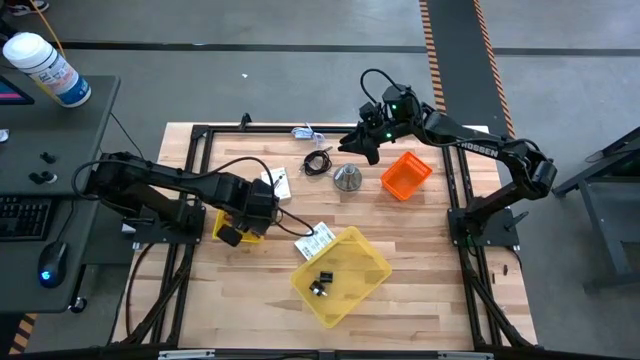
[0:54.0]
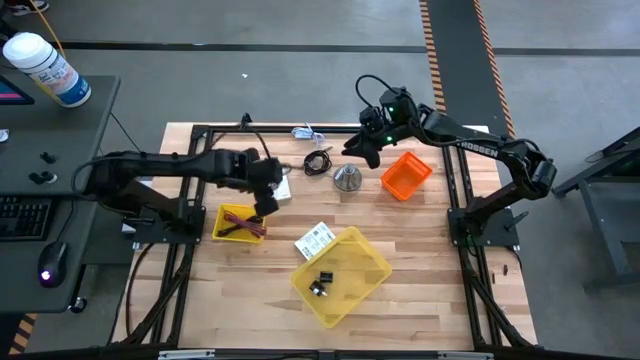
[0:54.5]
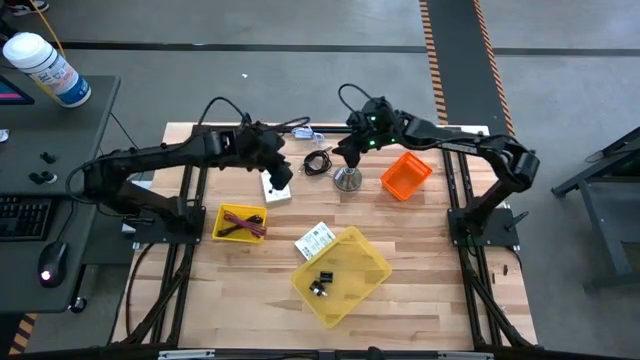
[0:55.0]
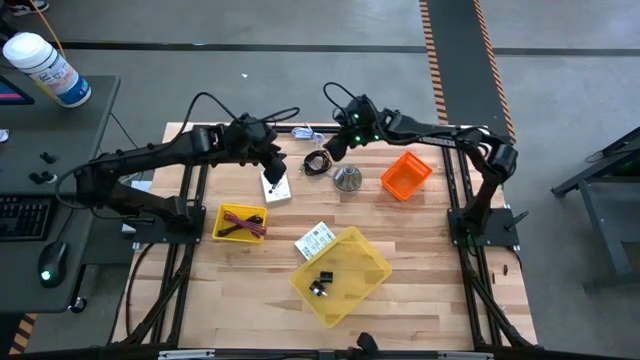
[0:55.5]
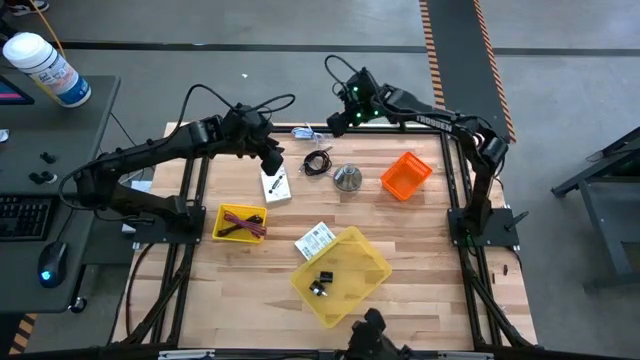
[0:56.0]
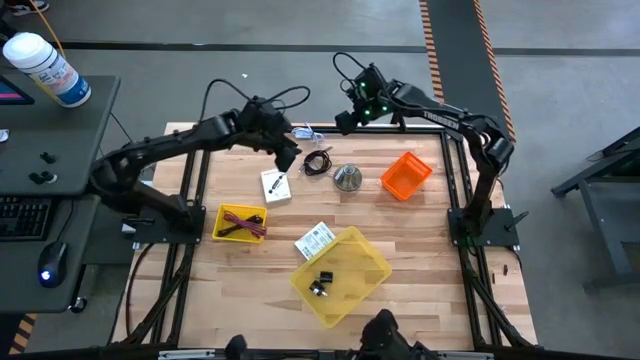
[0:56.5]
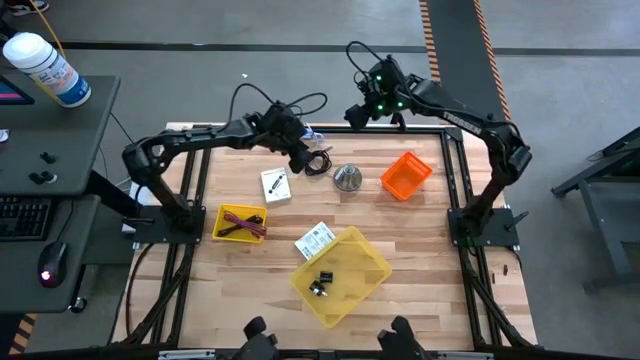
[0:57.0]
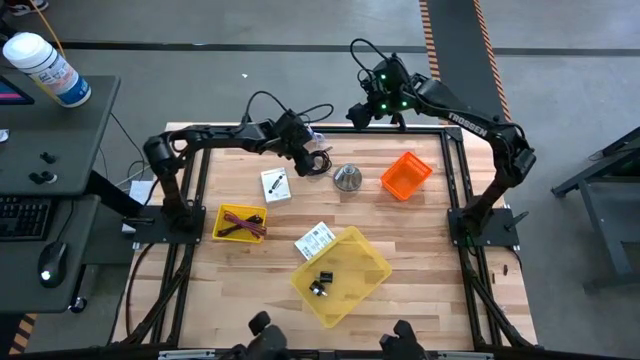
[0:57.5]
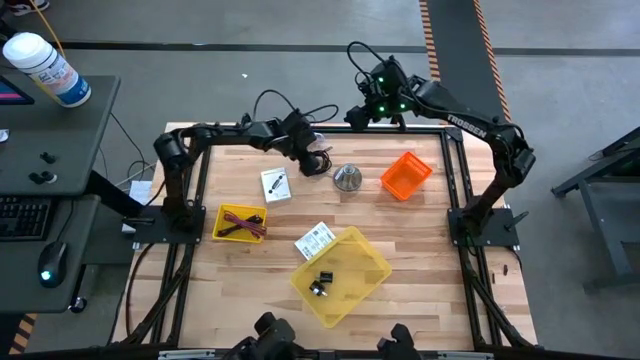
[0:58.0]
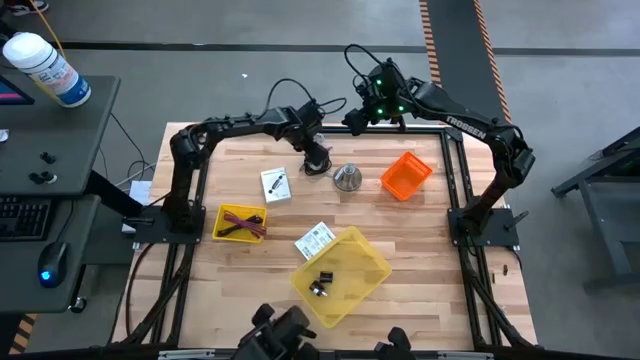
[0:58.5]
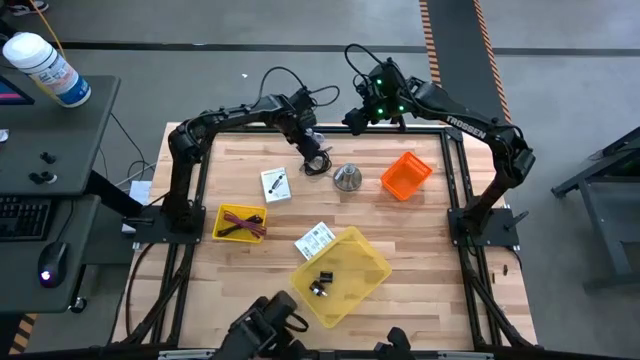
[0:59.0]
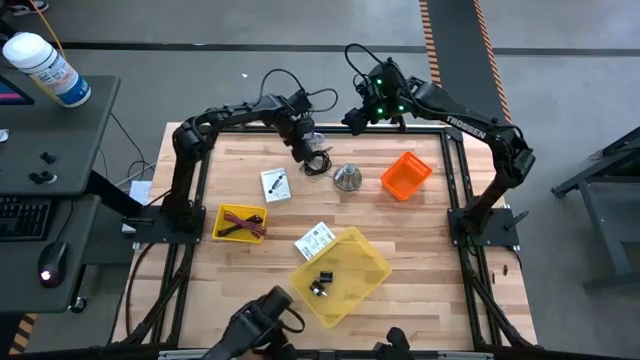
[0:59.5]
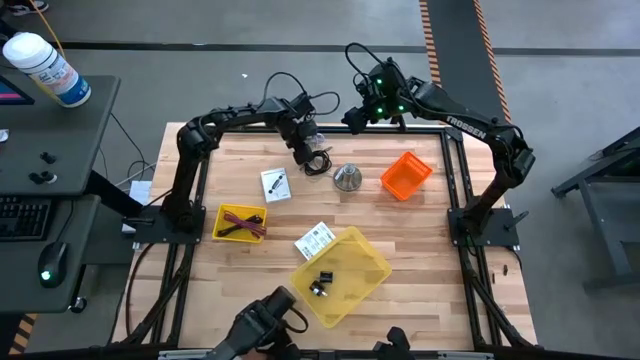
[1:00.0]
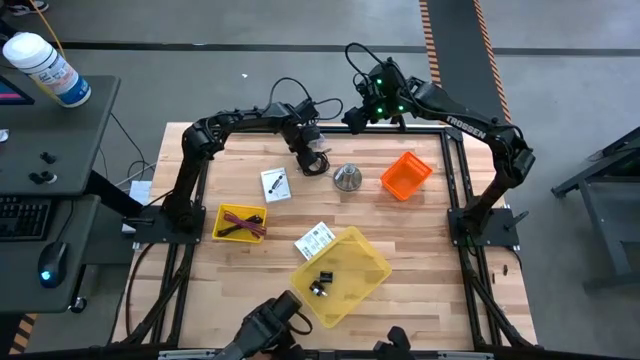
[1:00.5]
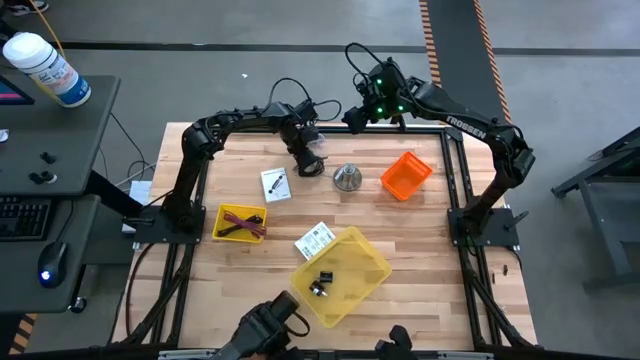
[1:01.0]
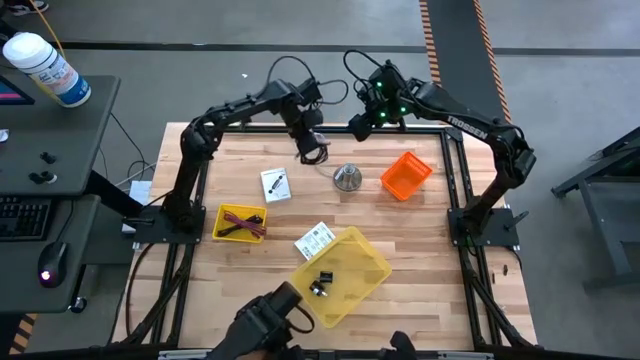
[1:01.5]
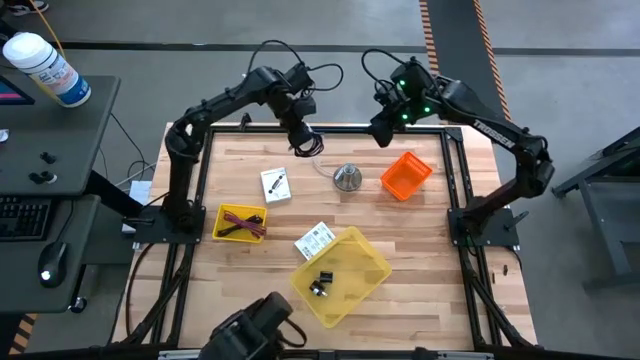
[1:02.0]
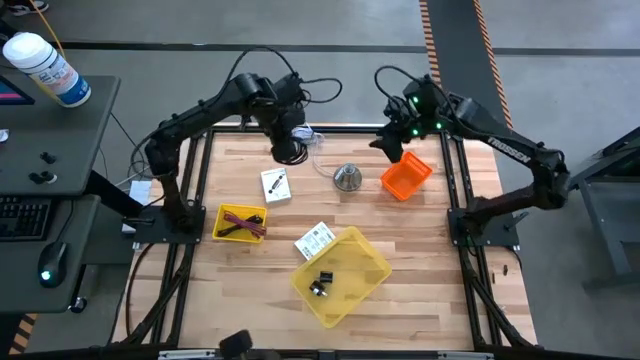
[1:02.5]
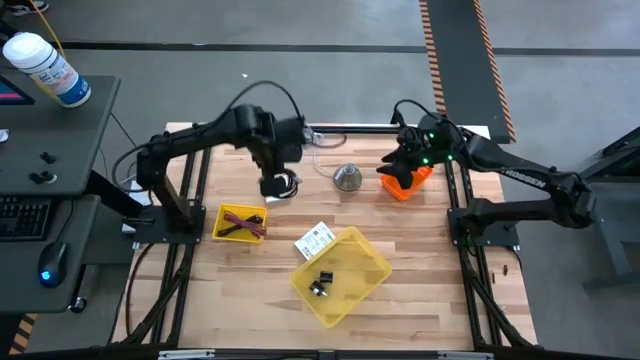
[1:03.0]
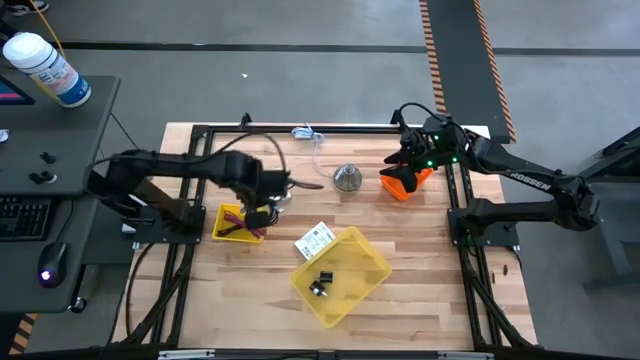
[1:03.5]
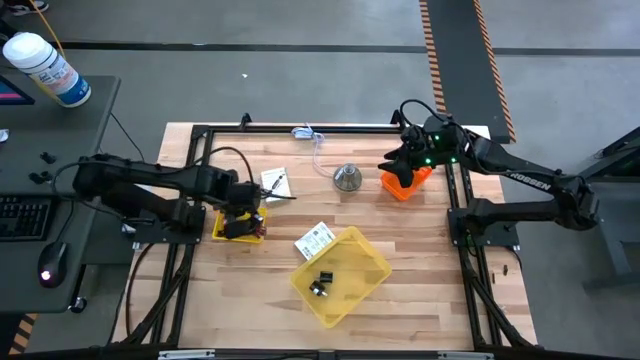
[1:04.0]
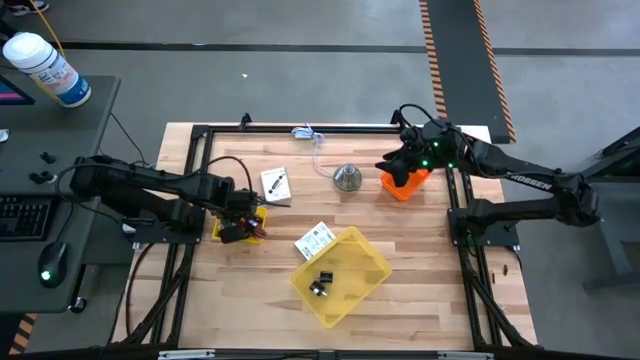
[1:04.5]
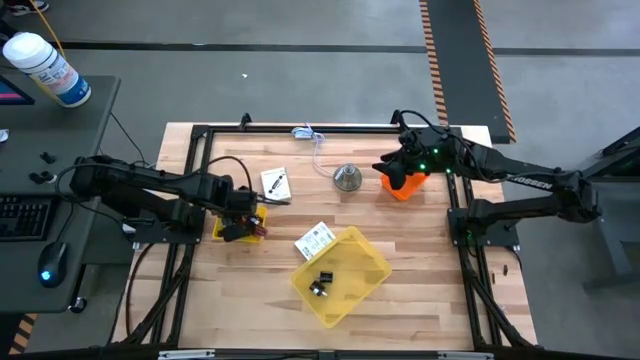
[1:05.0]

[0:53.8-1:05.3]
Task: Pick and place items into bin
Put the black cable charger into the left yellow bin

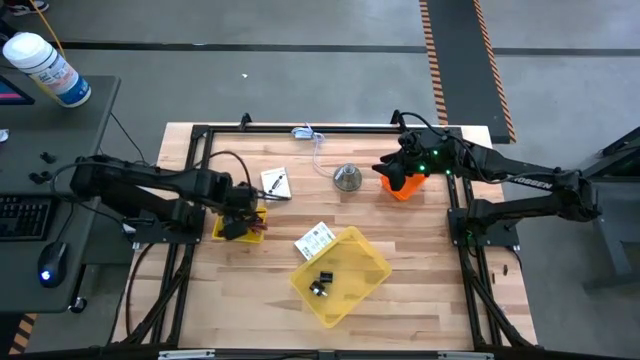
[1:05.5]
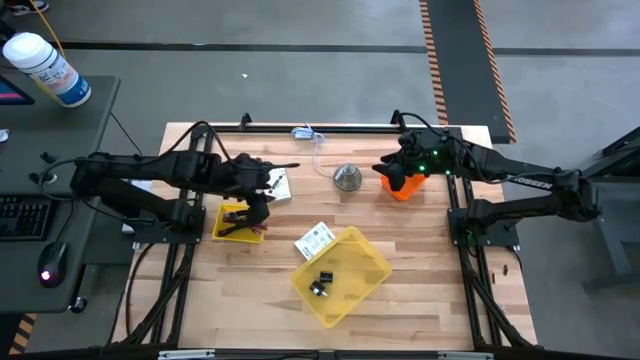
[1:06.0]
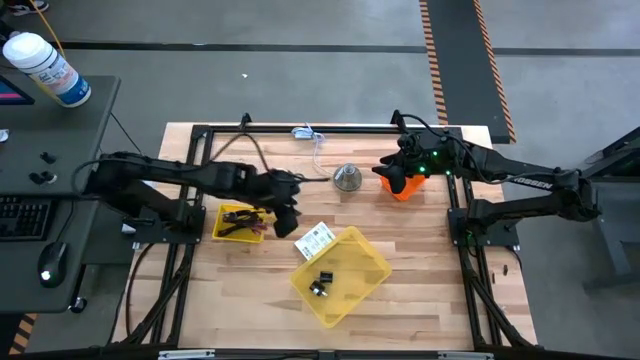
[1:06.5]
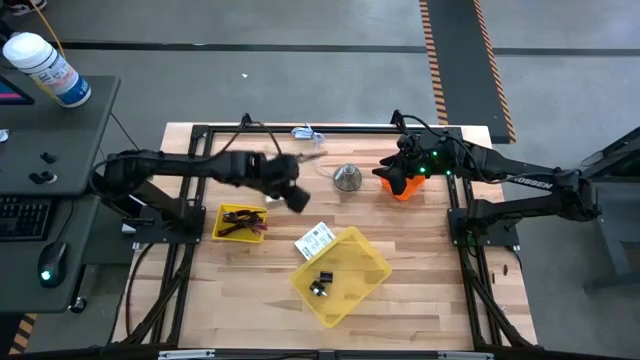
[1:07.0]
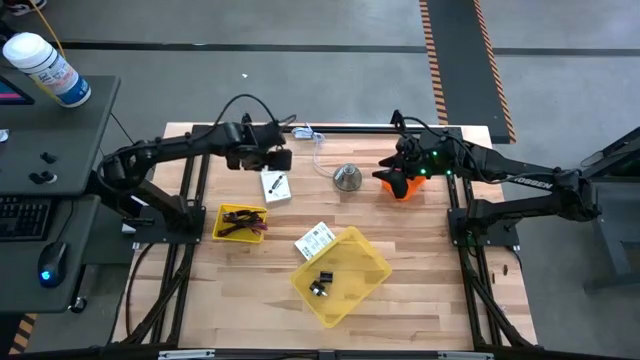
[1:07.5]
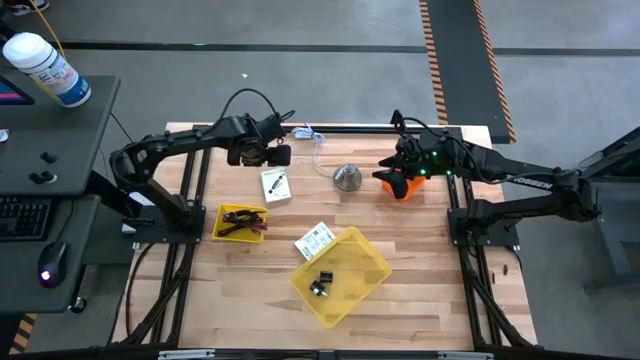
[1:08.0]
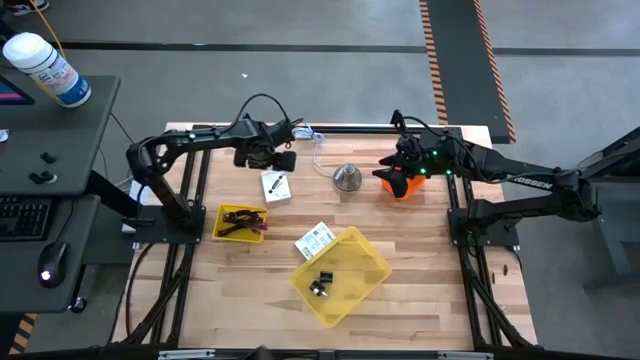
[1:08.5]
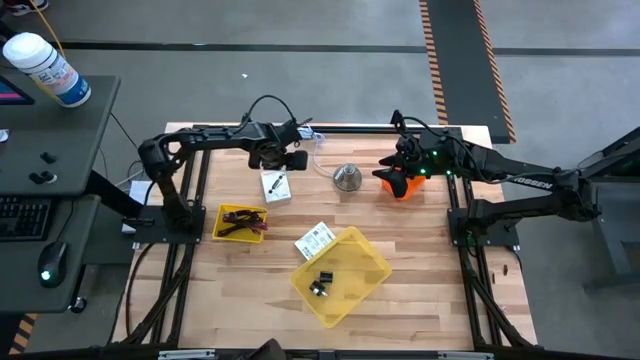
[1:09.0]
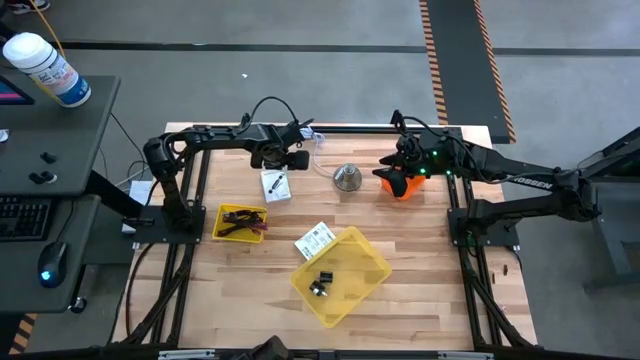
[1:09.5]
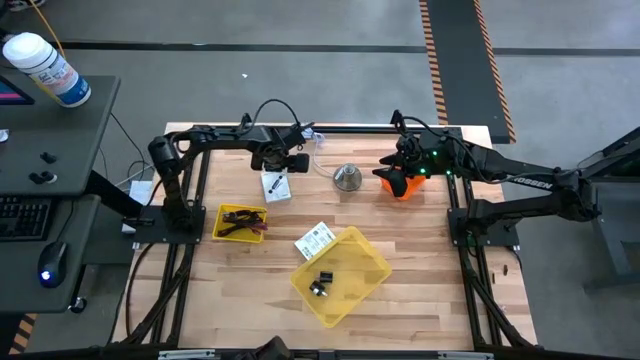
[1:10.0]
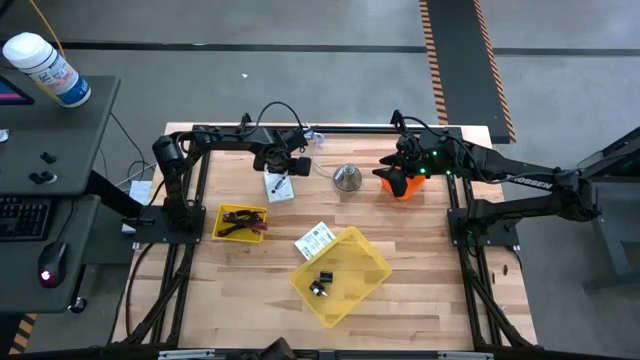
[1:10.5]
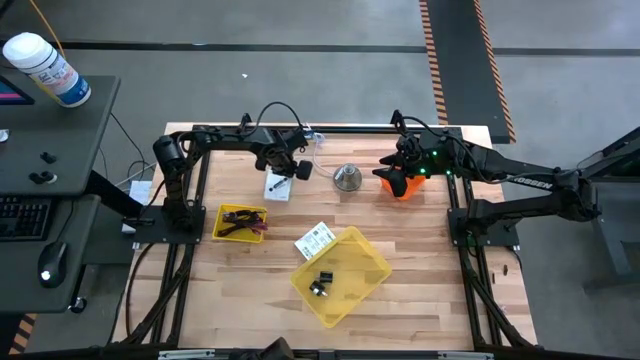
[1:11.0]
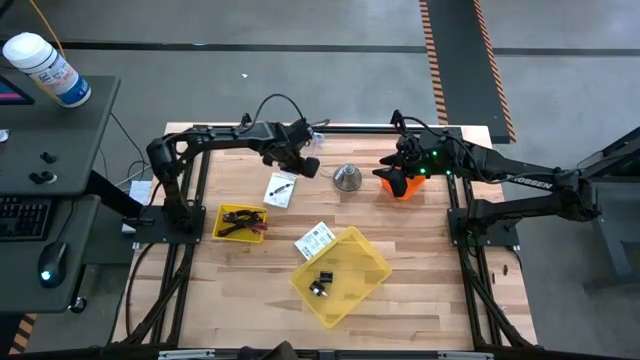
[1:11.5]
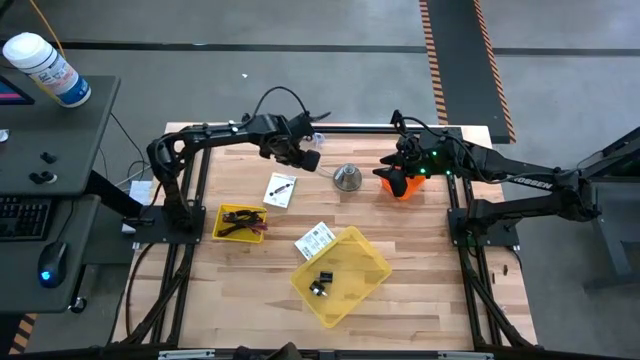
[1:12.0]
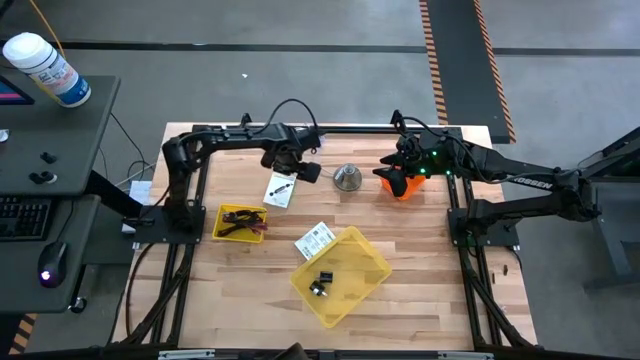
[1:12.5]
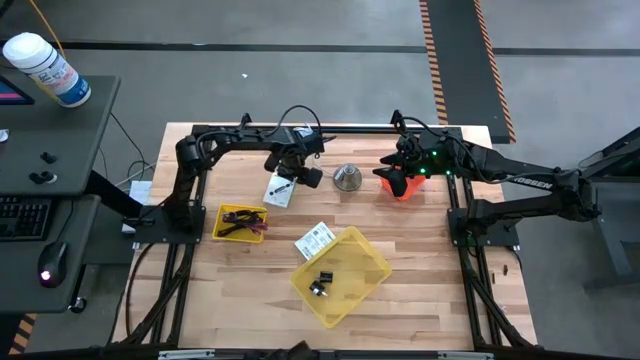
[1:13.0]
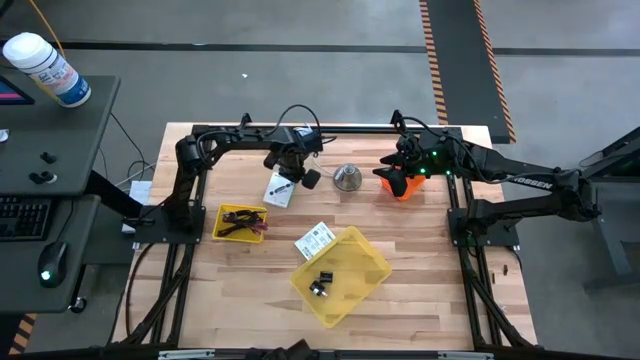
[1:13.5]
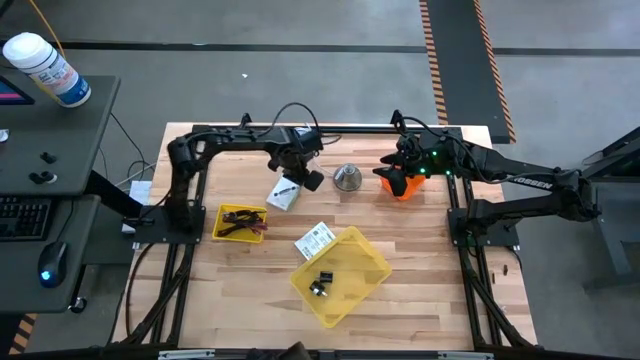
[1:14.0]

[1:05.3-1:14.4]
Put the top white card reader box into the orange bin
